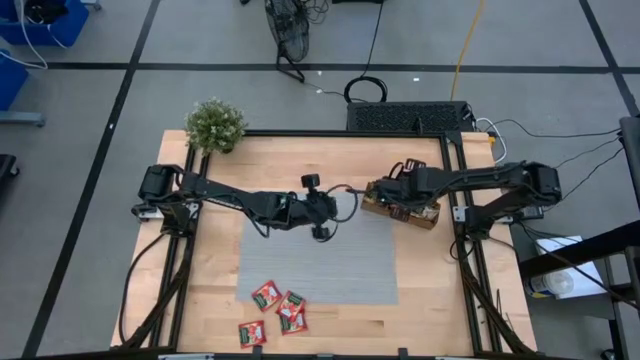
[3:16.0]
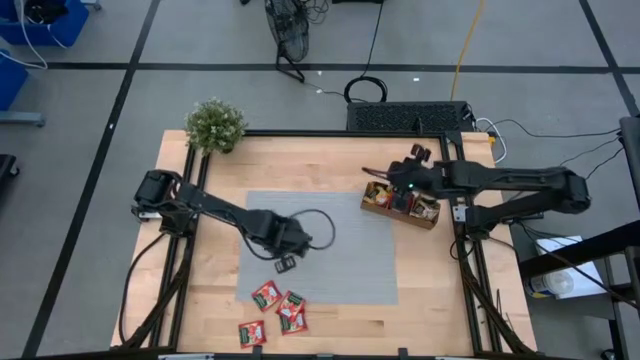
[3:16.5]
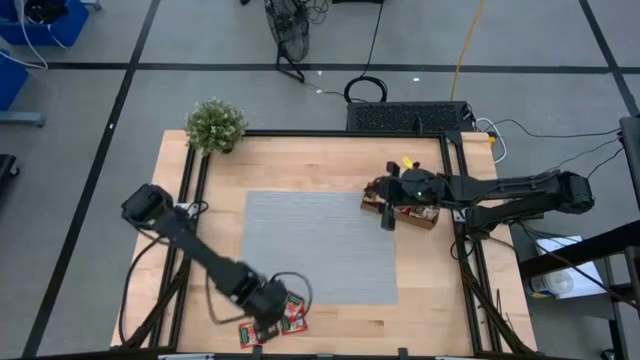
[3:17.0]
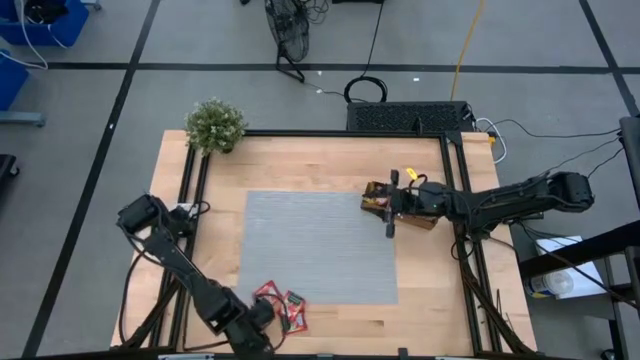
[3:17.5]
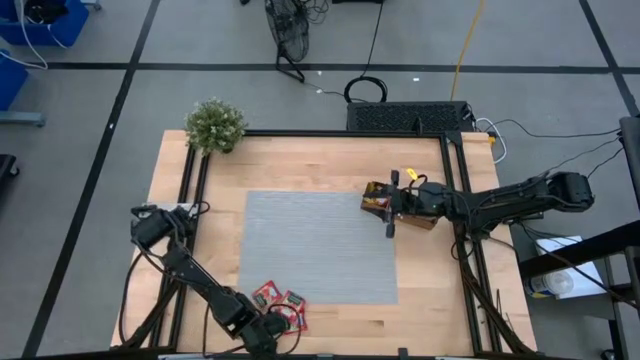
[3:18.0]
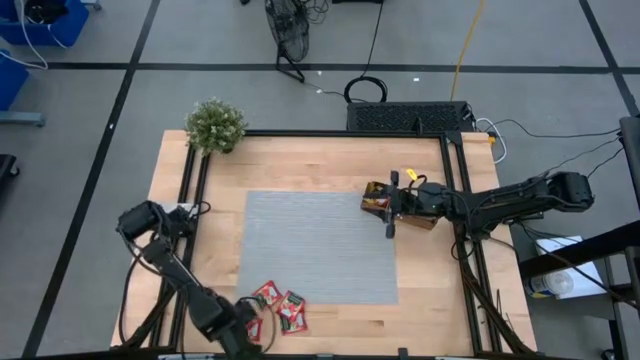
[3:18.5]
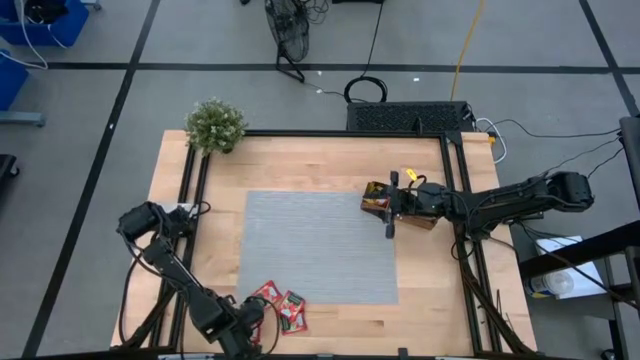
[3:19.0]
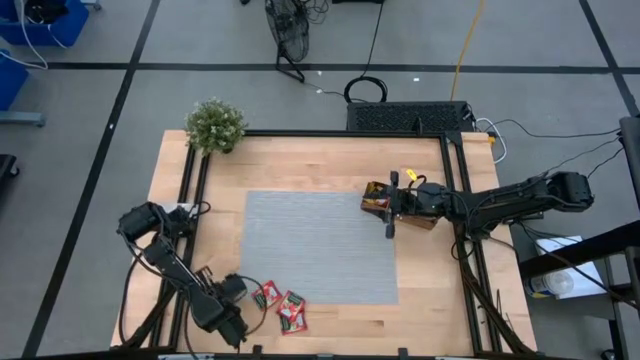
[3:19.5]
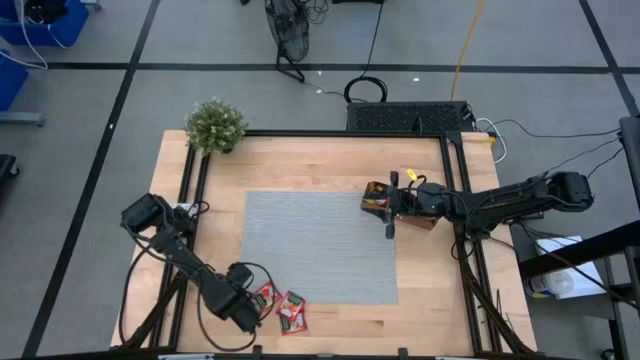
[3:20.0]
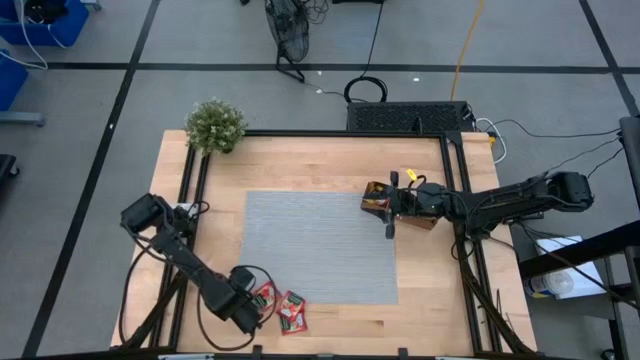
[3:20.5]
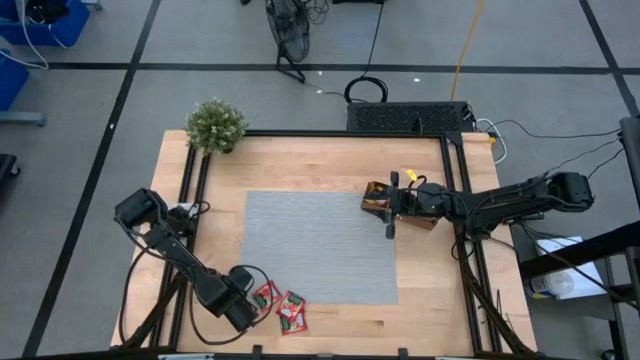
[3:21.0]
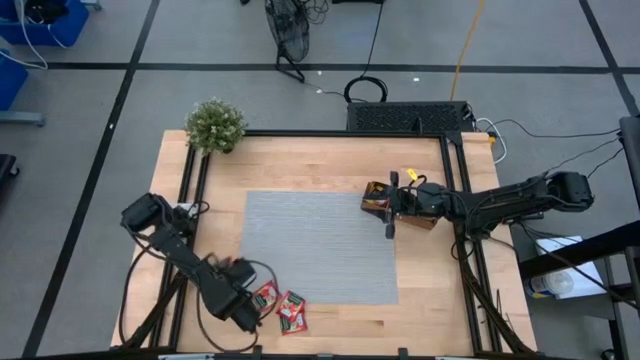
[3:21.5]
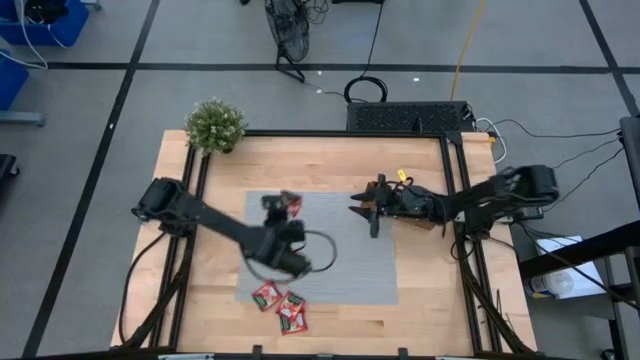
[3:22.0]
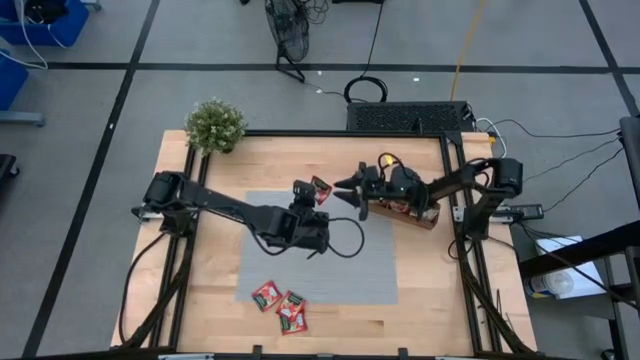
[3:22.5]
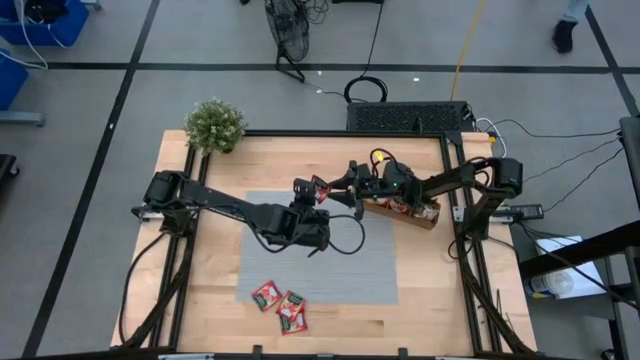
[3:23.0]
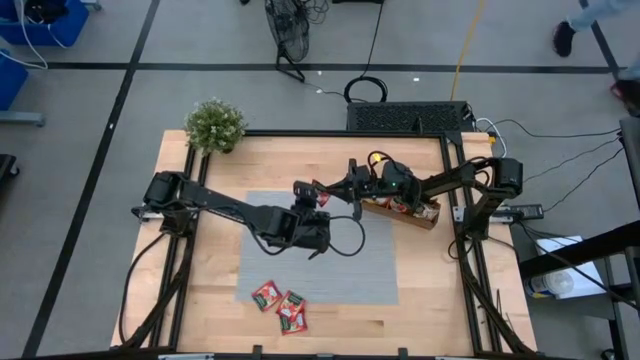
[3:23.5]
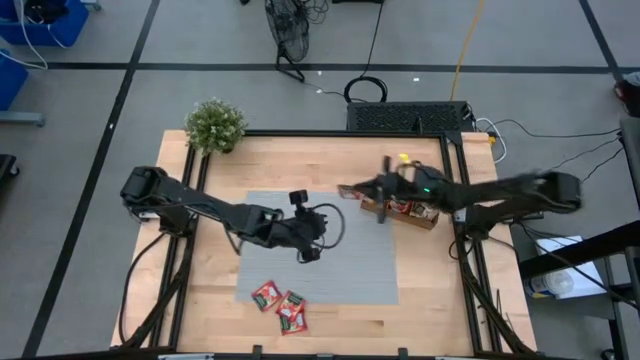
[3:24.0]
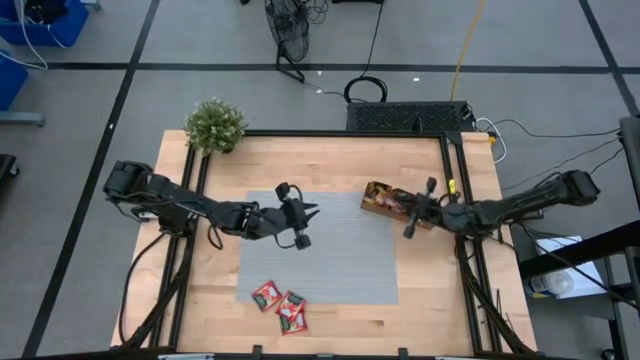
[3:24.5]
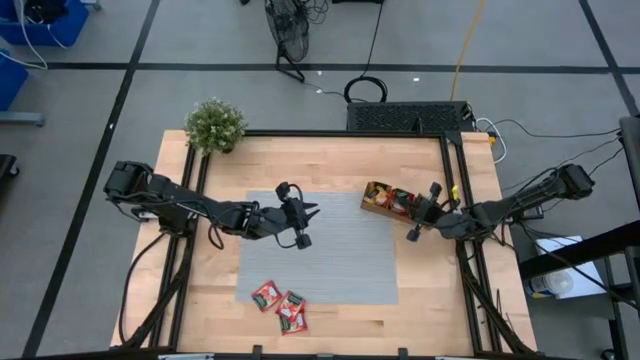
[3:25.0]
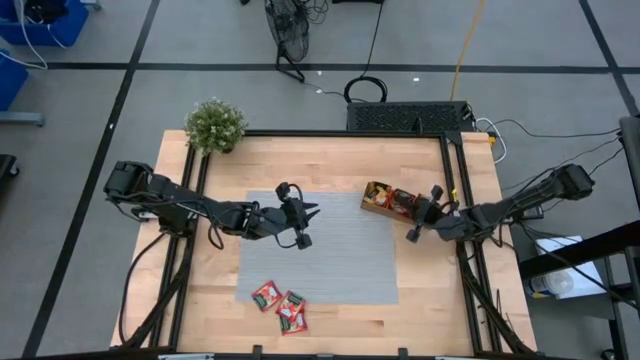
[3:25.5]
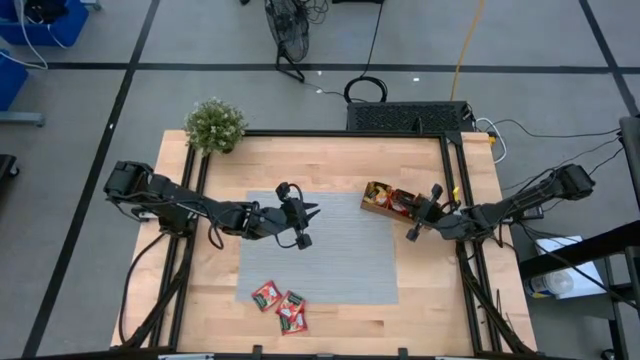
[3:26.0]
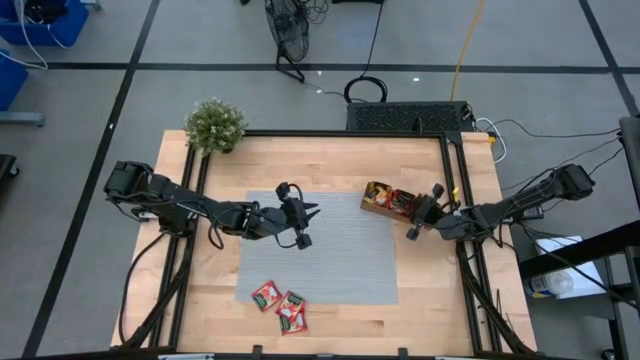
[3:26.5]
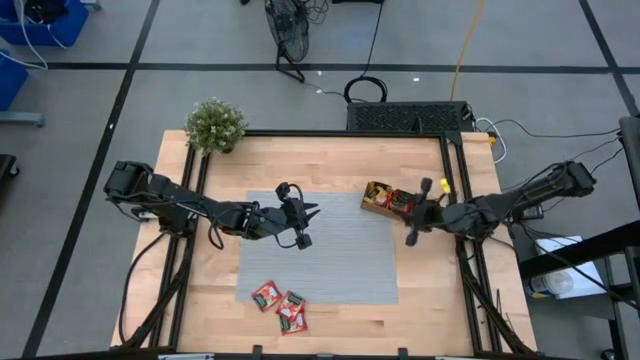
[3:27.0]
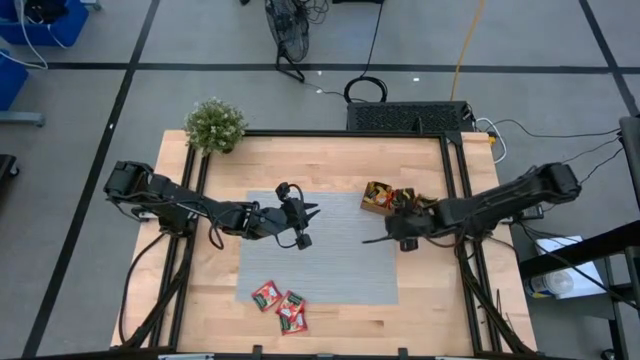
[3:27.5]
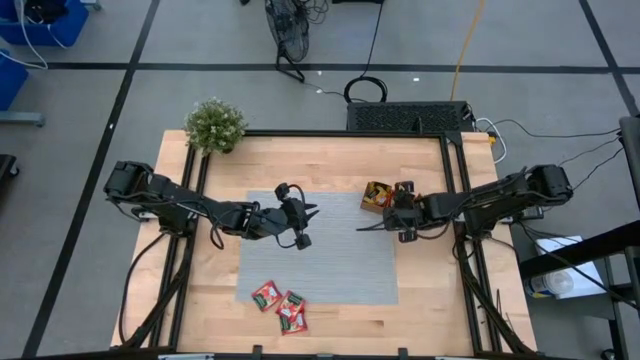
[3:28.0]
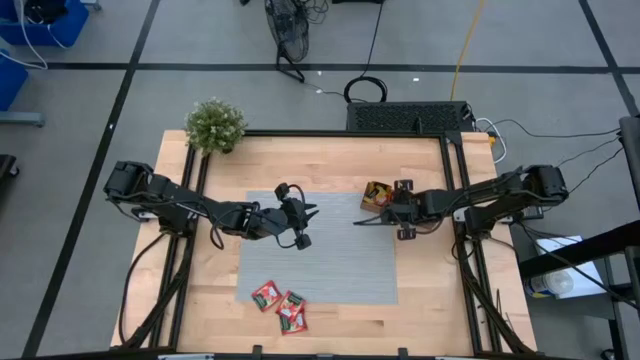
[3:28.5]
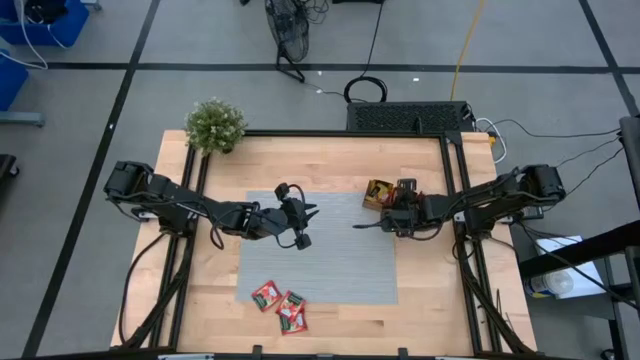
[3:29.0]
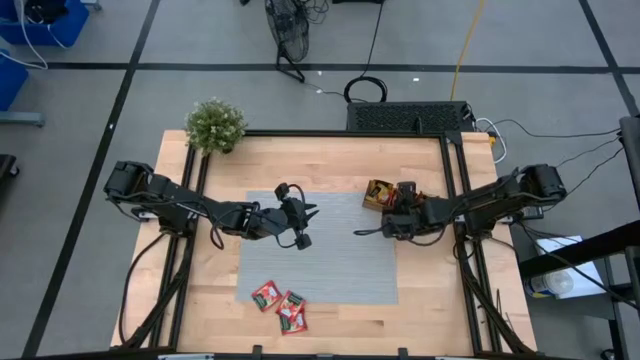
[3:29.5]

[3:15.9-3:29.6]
Task: Pick & Place Tea
Put the red tea bag into the middle section of the wooden organizer

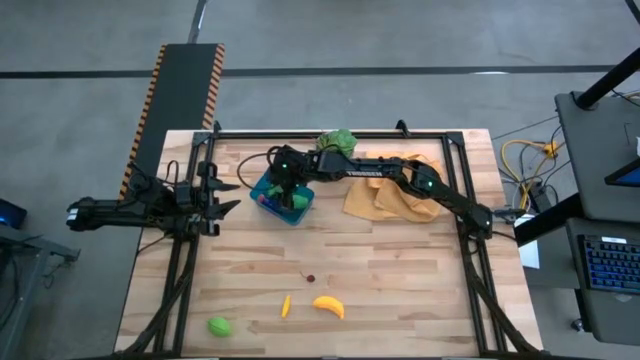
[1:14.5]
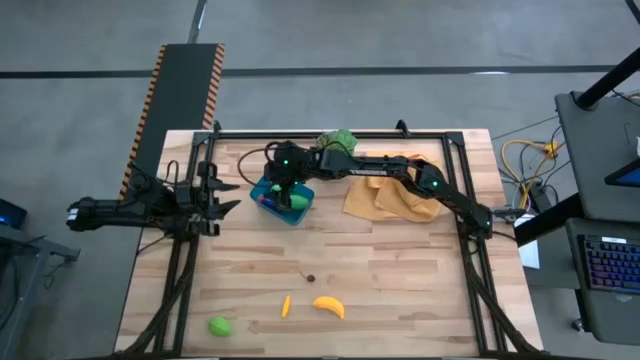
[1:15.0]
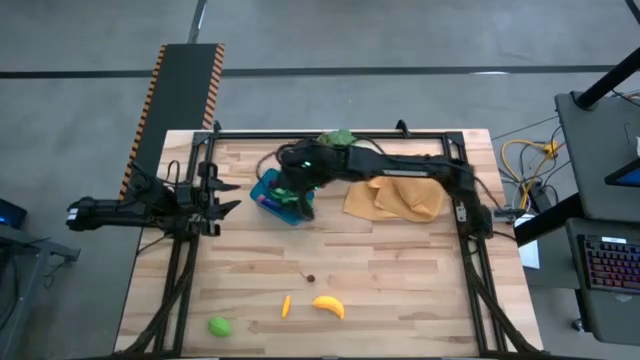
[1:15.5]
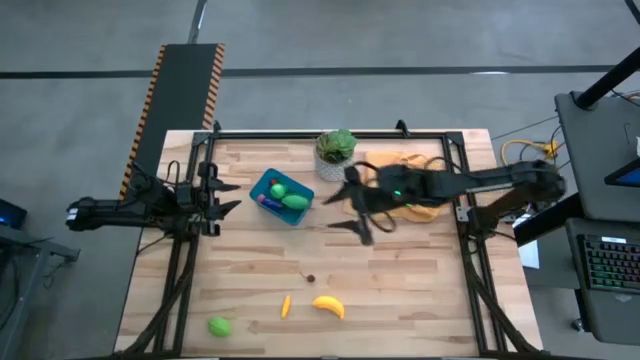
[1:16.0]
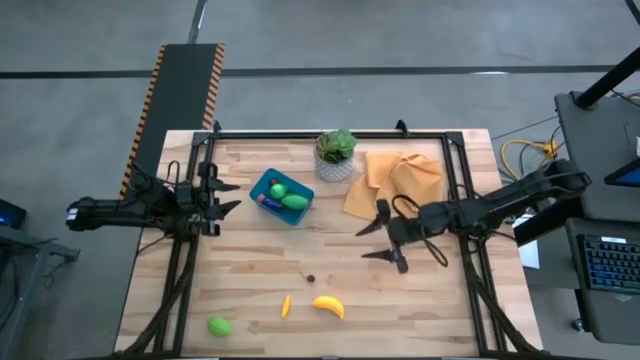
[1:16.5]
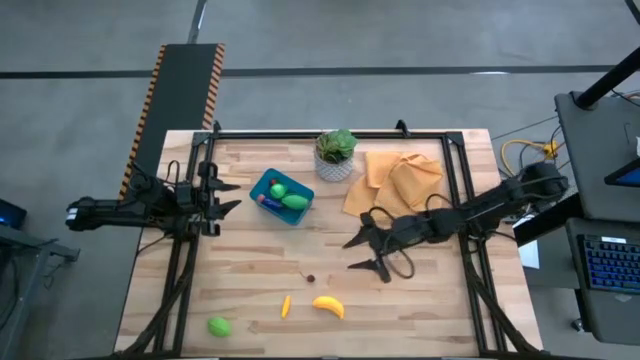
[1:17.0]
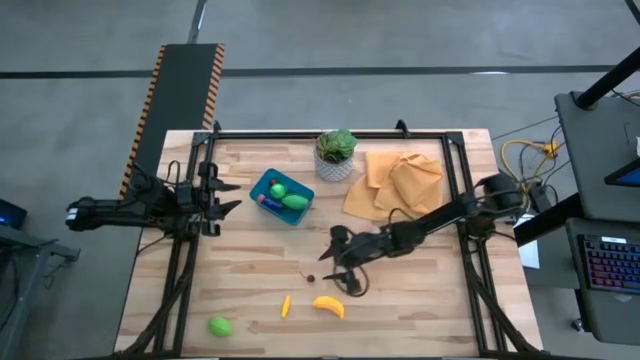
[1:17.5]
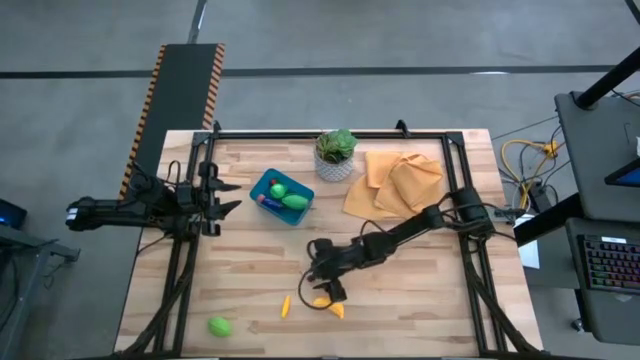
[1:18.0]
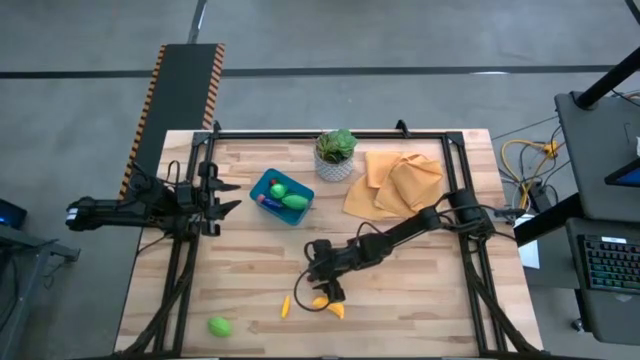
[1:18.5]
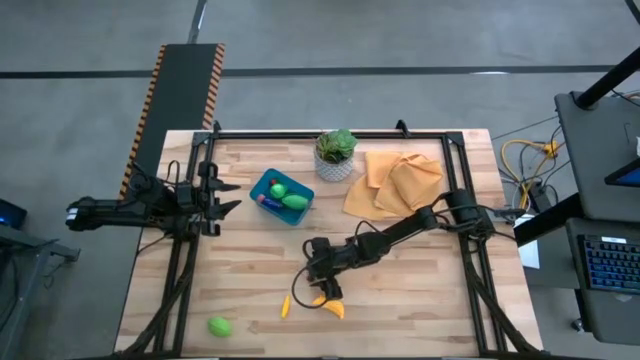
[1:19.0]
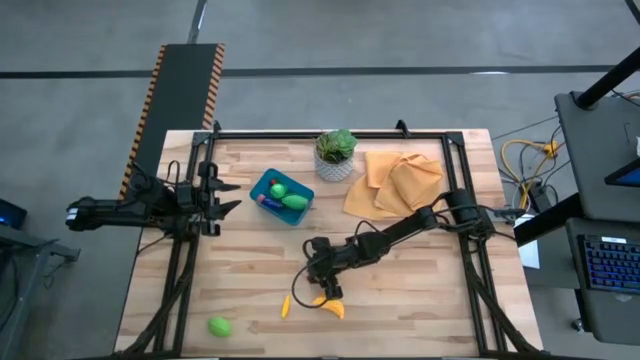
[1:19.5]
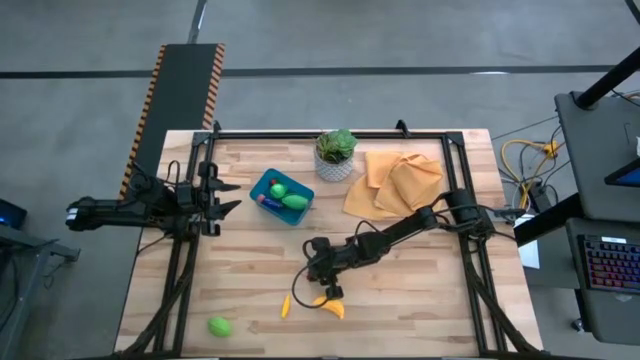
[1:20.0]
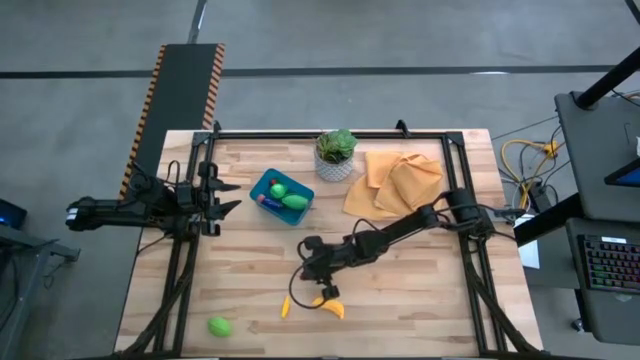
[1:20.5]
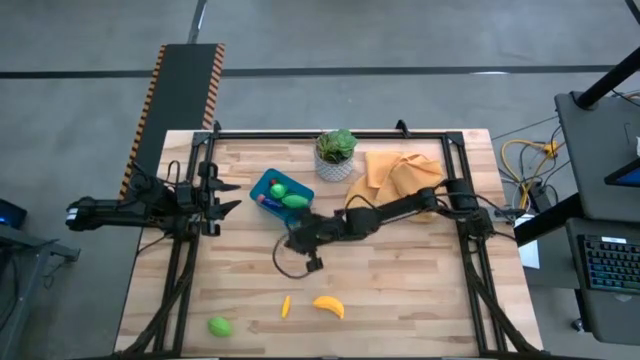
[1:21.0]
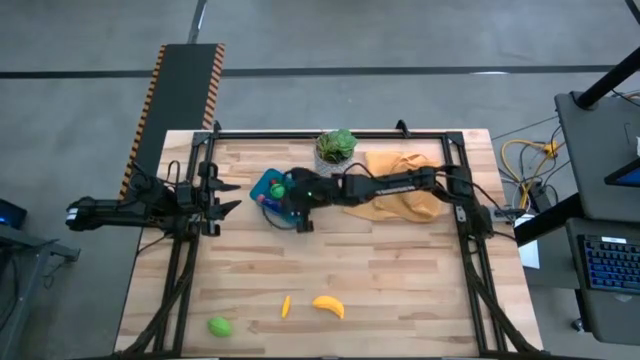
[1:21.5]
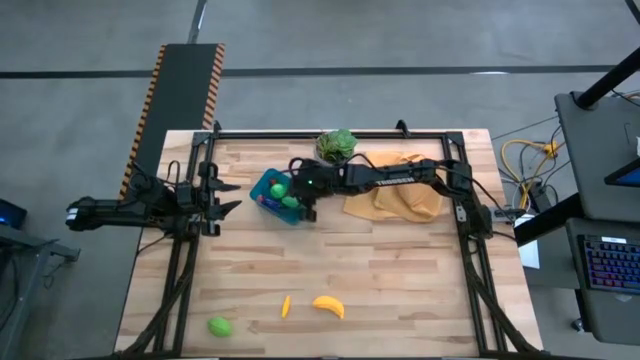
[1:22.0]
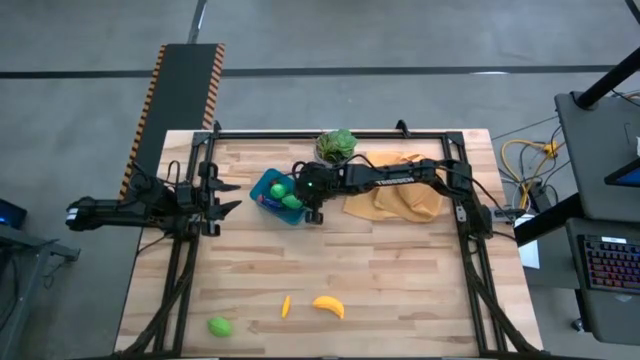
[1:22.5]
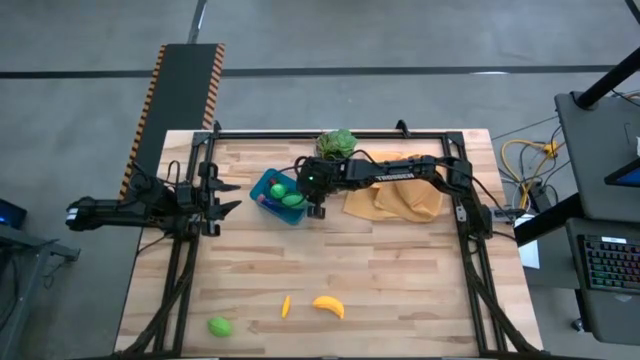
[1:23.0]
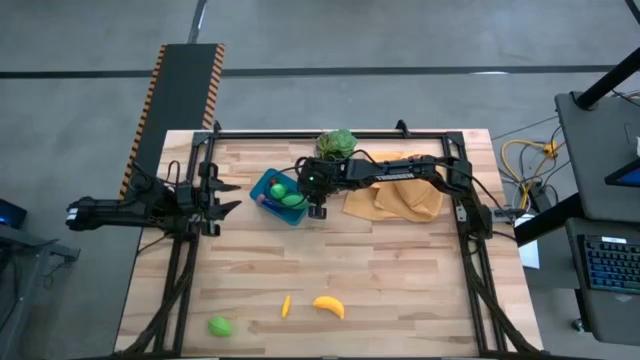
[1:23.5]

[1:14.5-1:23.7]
Task: Pick and placing Produce into tupperware
Put the red cherry into the blue bin
